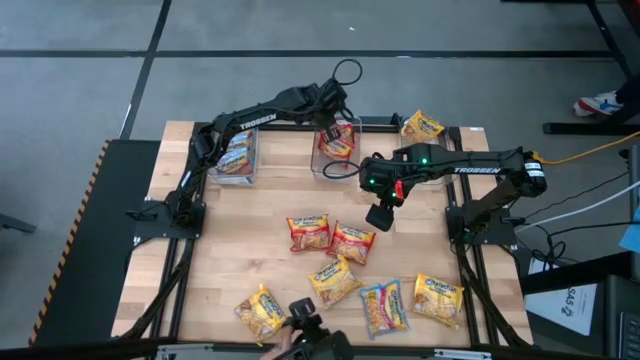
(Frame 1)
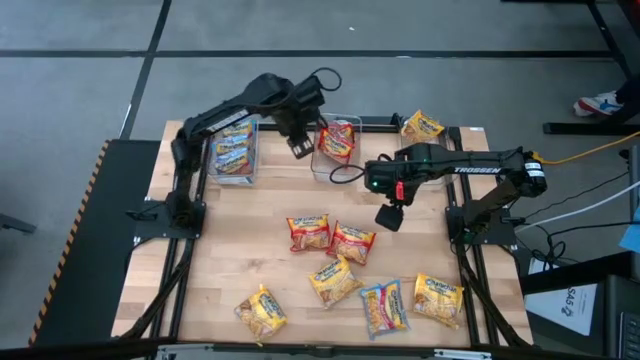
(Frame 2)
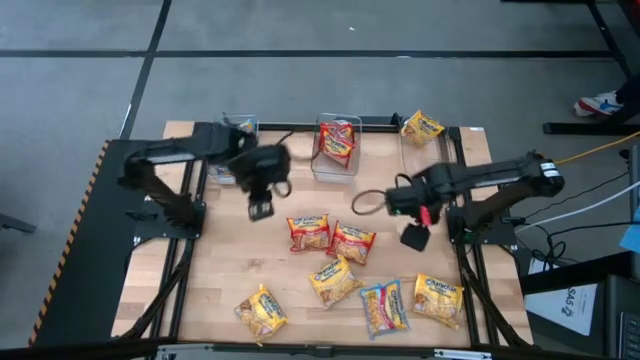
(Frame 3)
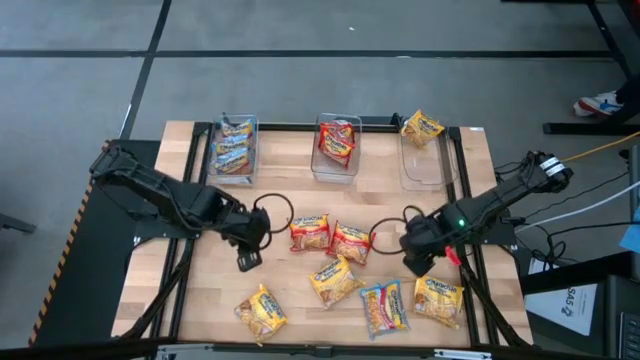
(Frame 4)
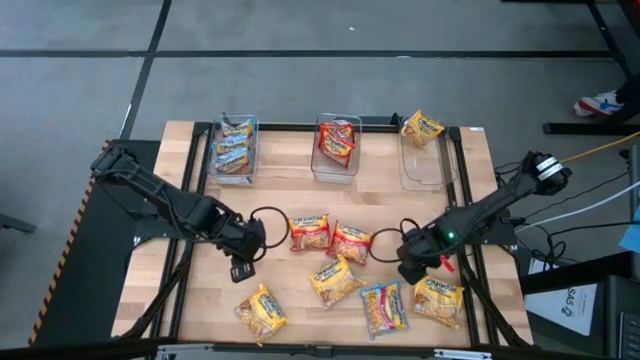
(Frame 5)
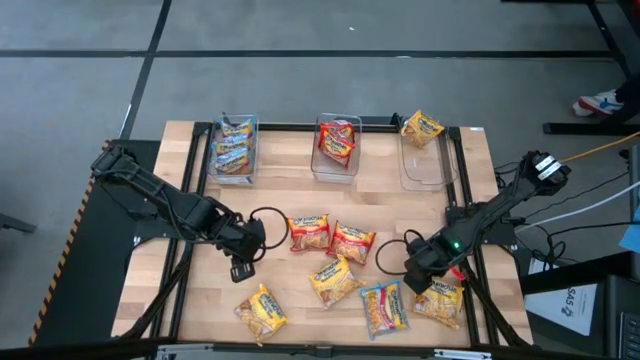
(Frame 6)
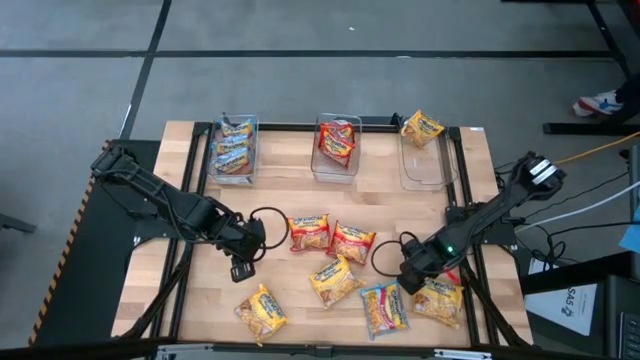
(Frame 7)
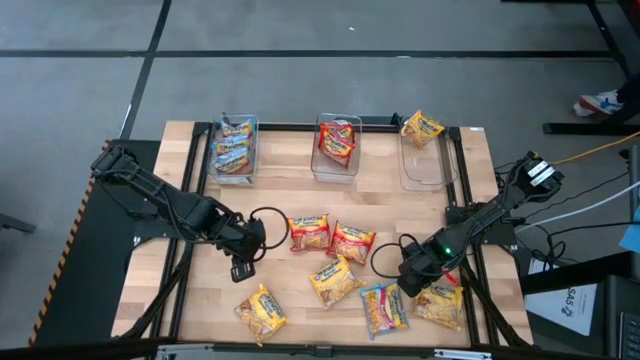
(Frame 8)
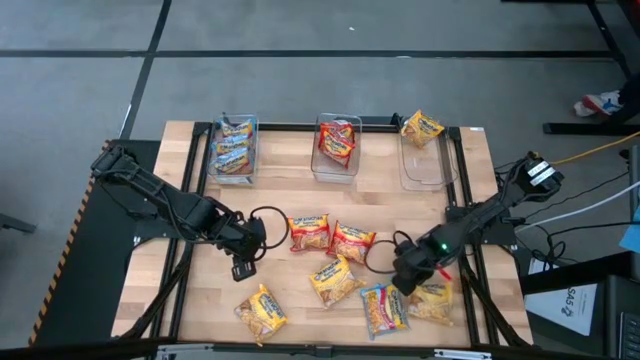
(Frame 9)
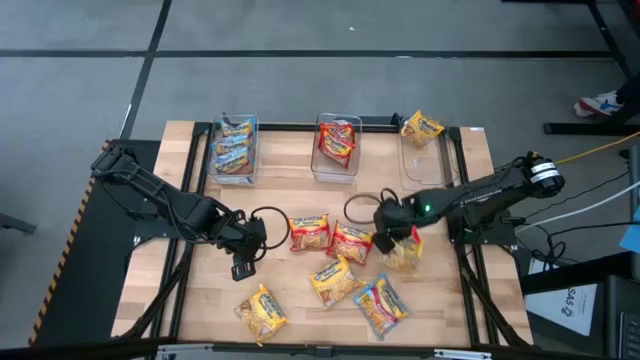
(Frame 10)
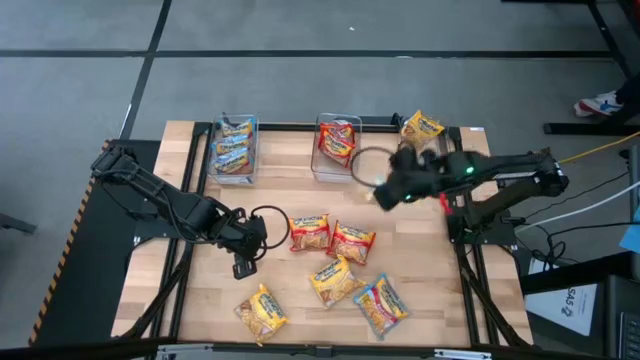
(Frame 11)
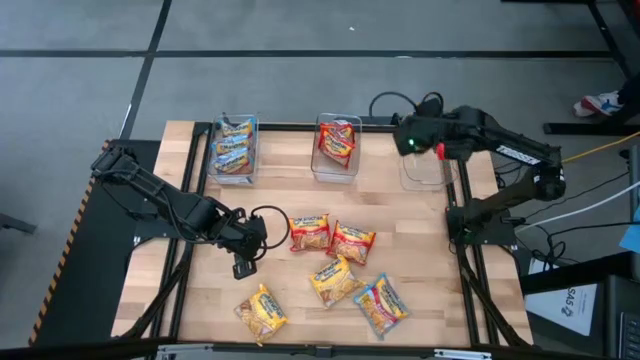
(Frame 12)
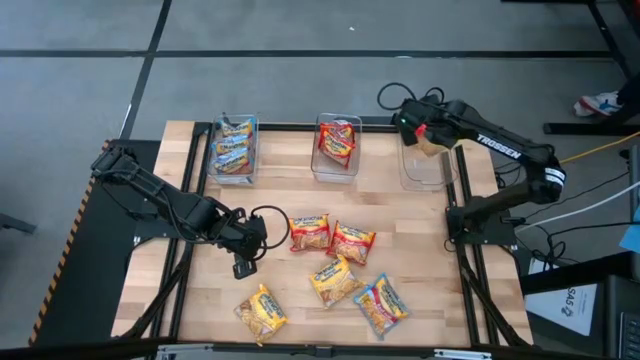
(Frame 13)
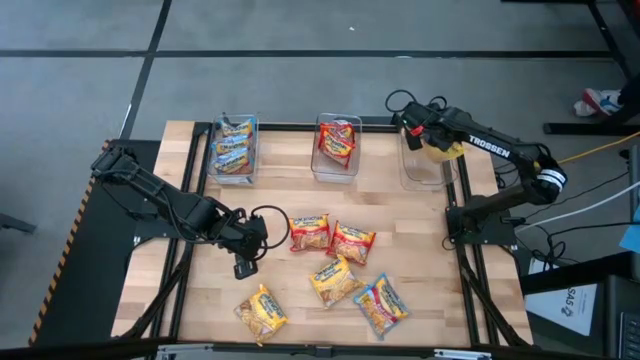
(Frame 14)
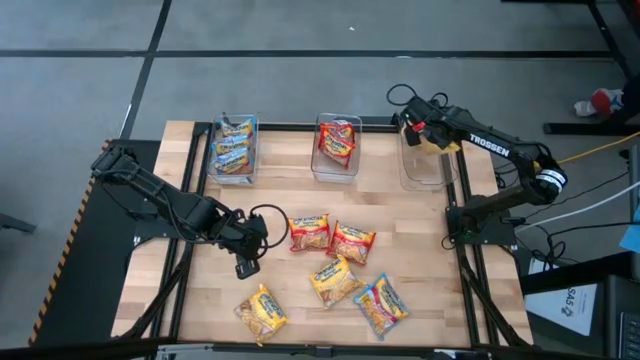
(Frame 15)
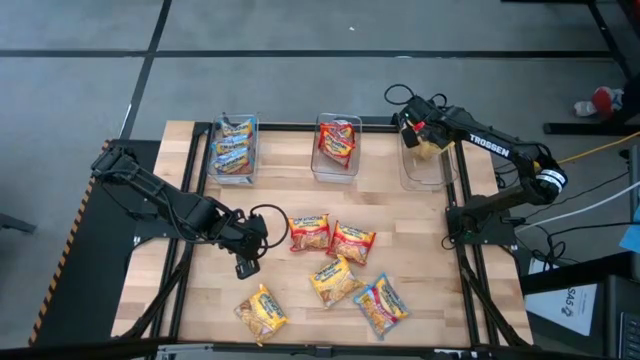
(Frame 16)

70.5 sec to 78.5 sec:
Task: Sort Maruchan noodles
Put the yellow noodle pack in the left transparent basket

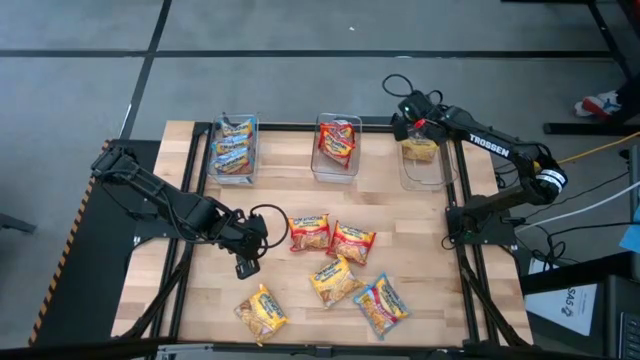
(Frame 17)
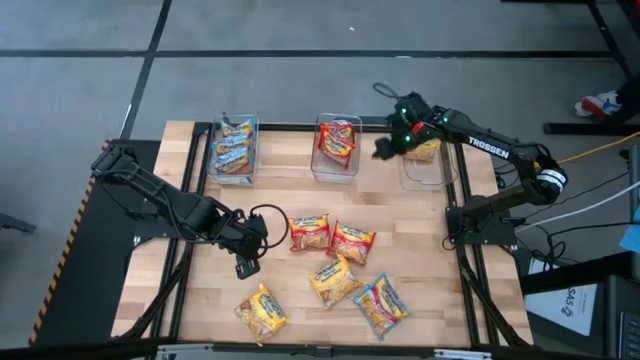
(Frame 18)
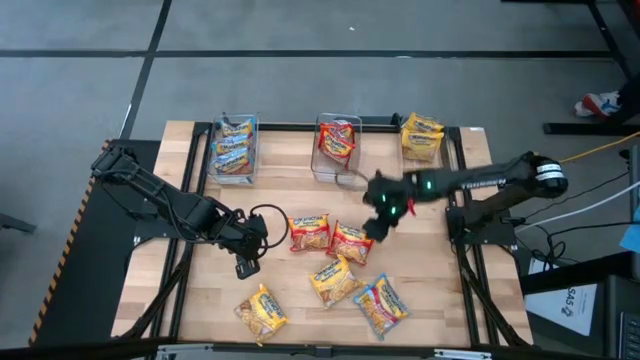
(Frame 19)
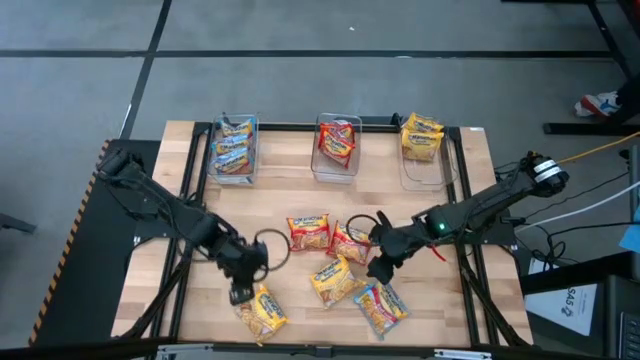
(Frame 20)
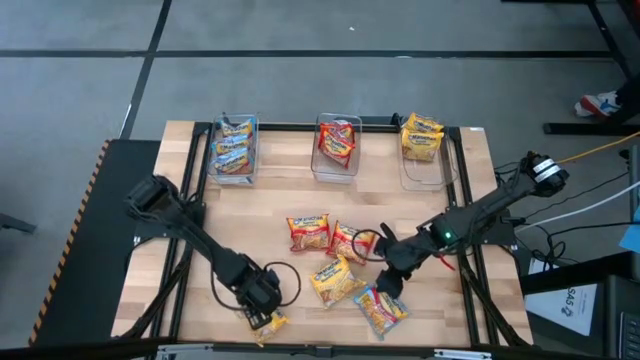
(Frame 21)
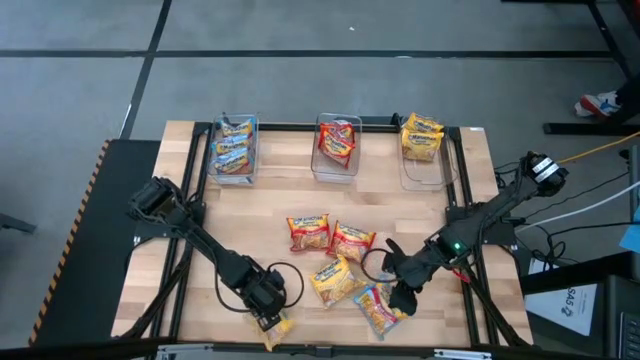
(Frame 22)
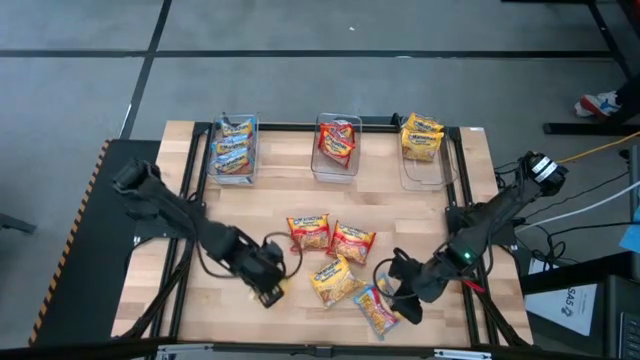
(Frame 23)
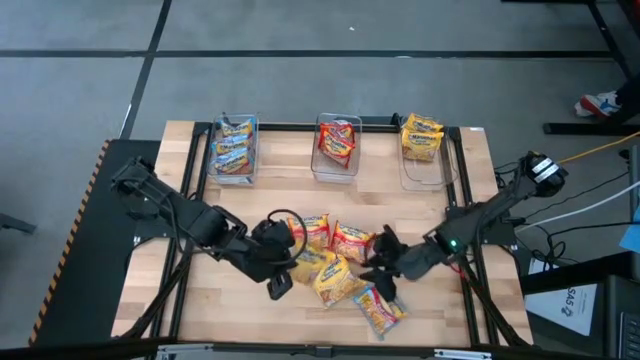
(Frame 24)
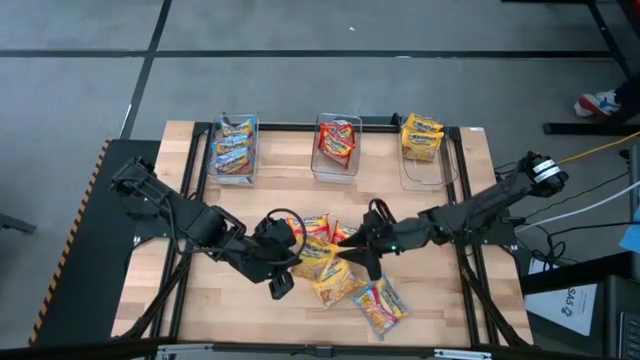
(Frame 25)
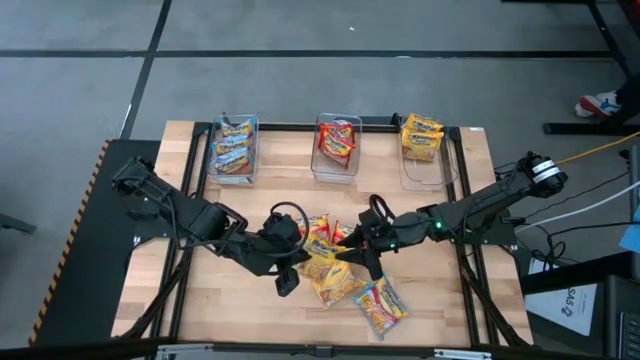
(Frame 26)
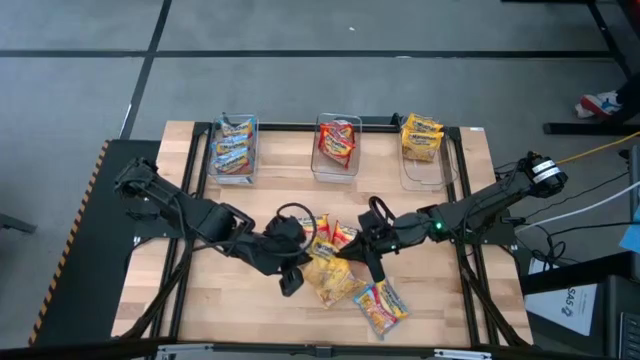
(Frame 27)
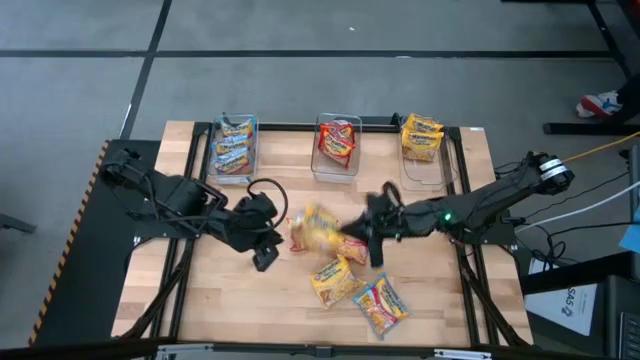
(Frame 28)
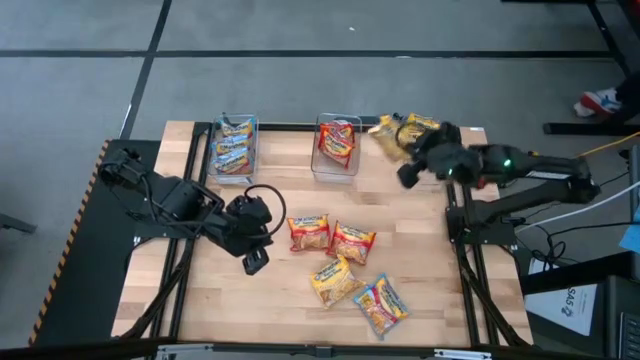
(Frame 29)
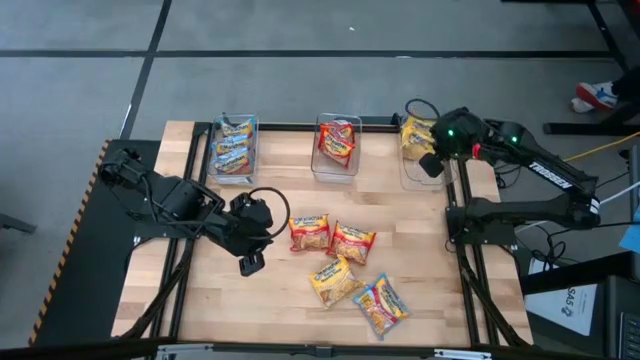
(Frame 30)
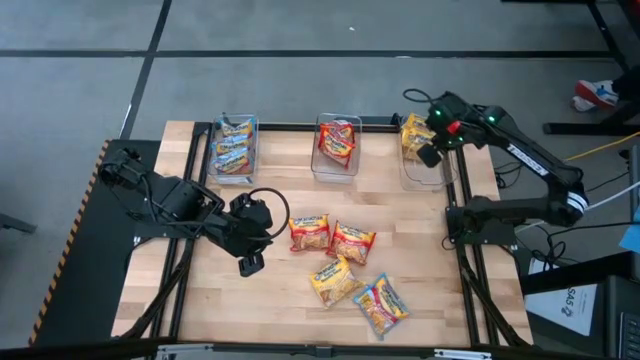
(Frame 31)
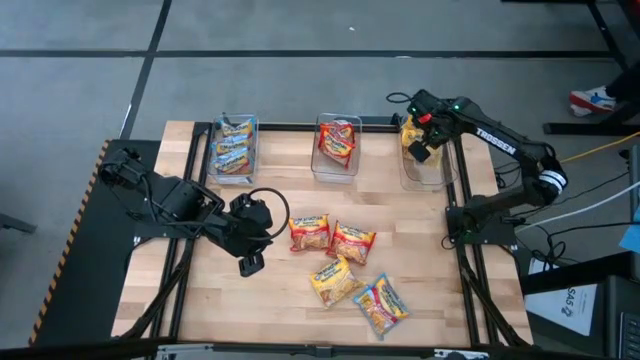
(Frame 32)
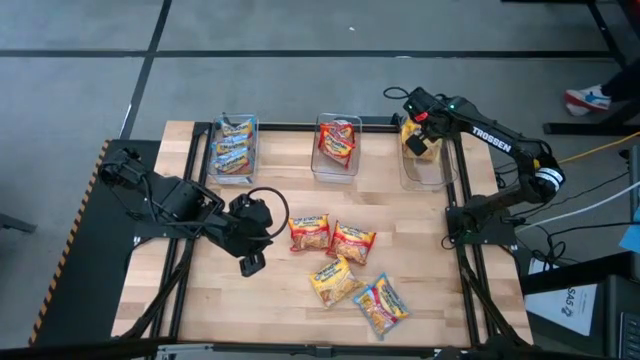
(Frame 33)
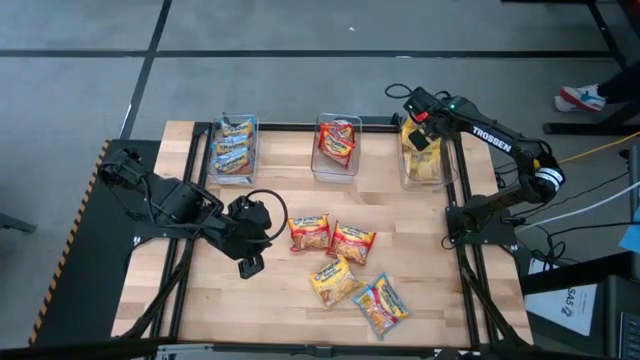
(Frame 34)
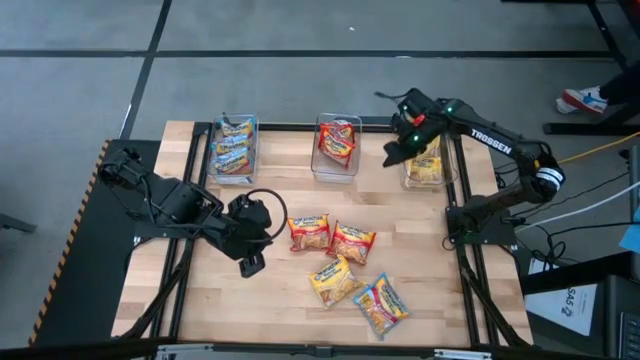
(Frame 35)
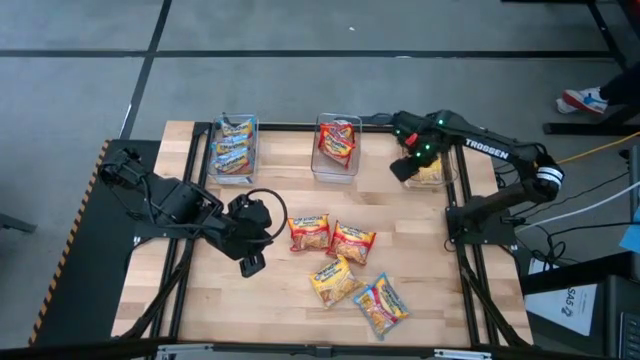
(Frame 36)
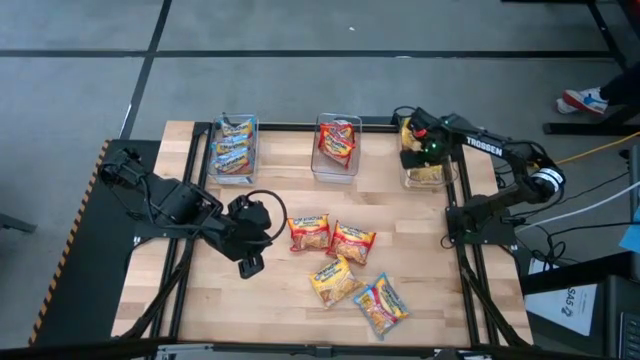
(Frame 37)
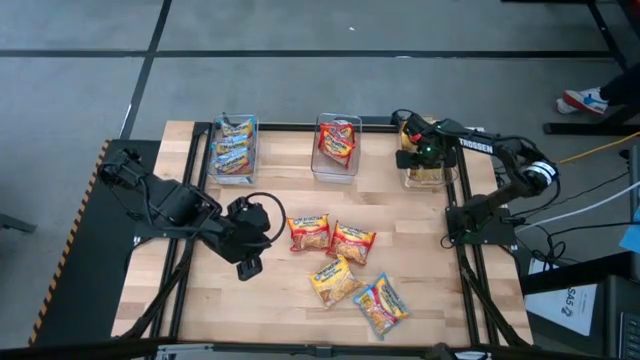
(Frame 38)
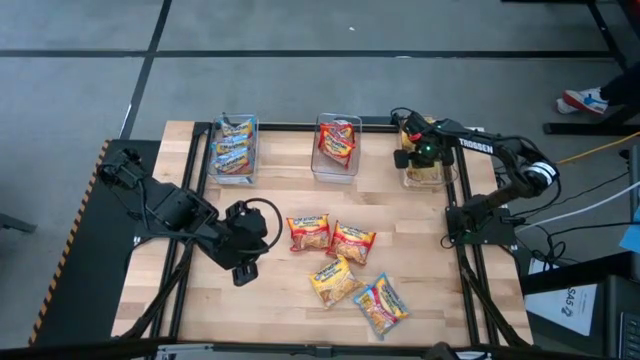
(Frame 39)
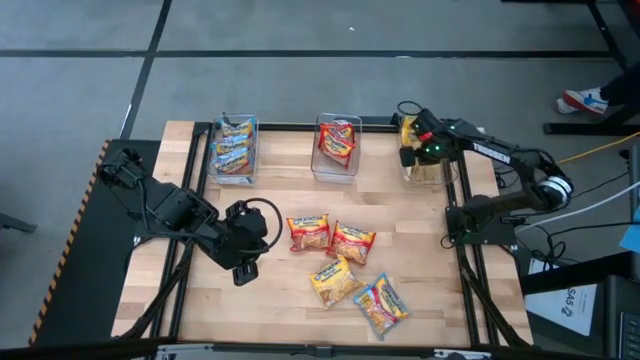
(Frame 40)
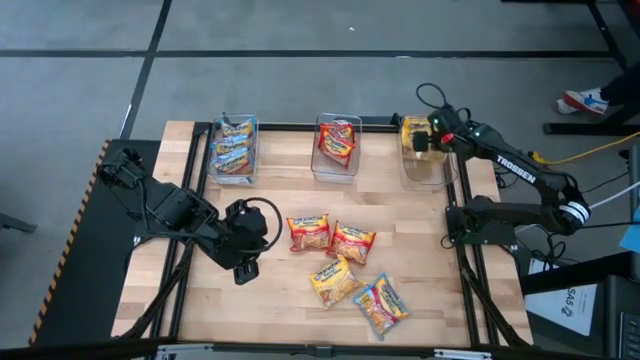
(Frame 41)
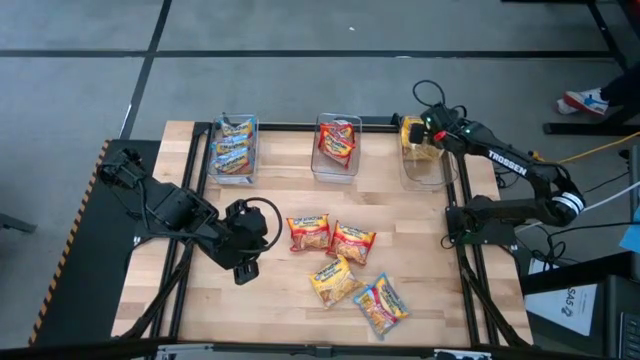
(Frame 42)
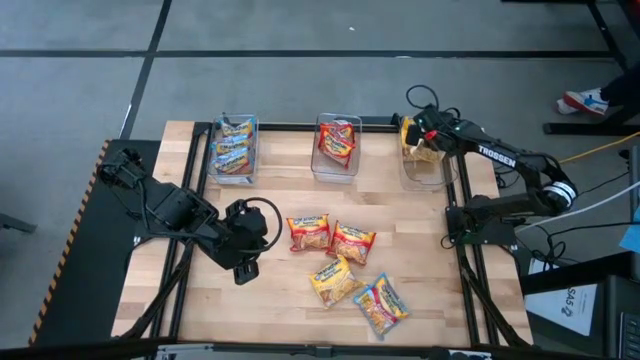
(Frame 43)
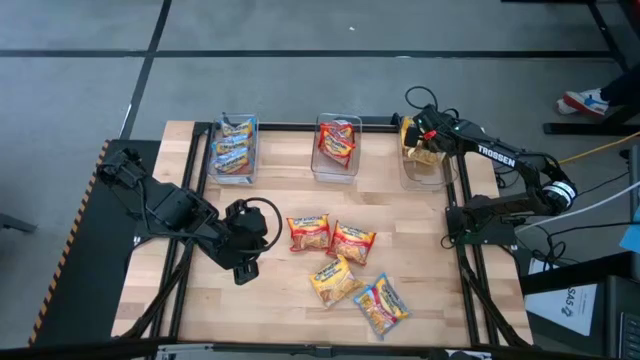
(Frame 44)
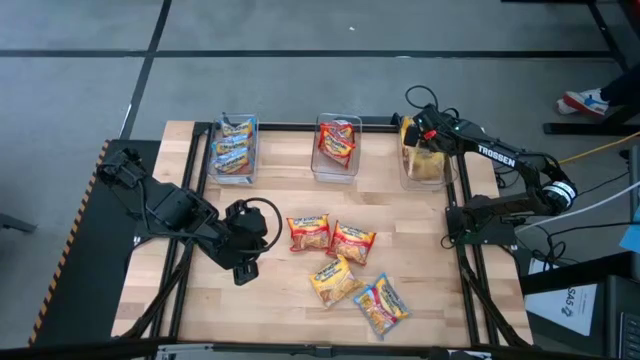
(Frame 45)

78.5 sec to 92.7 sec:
Put the yellow noodle pack in the right transparent basket

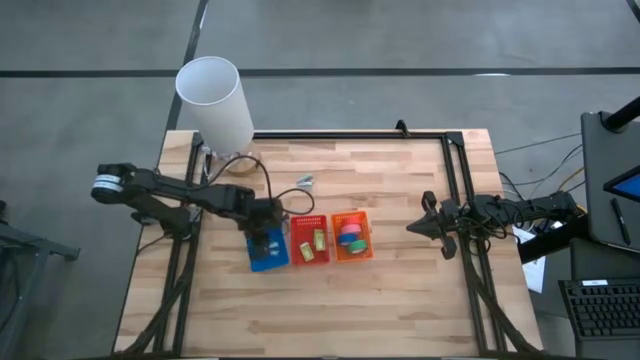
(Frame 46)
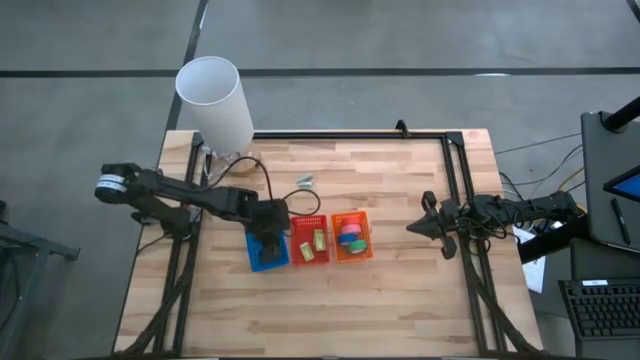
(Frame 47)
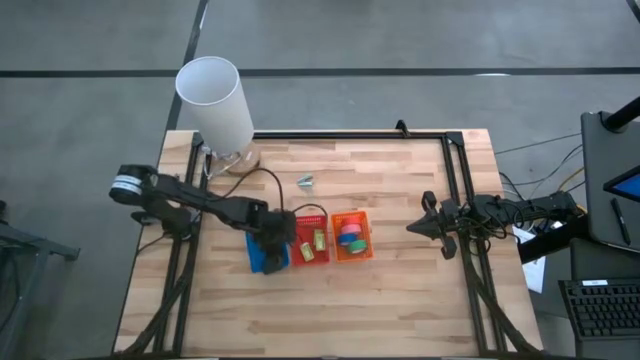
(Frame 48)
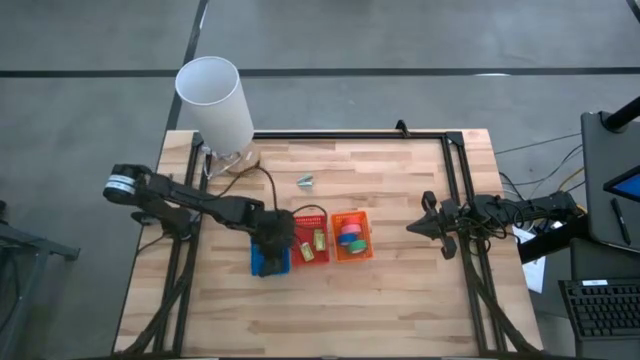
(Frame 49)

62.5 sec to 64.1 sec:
Task: Pick and place Stapler, Stapler remover, tape
Adjust the blue bin on the table
